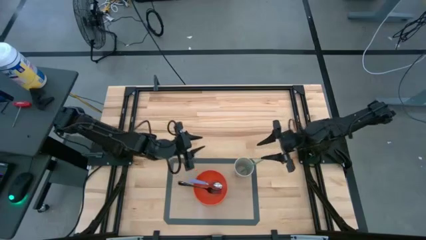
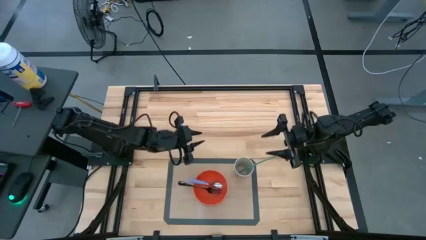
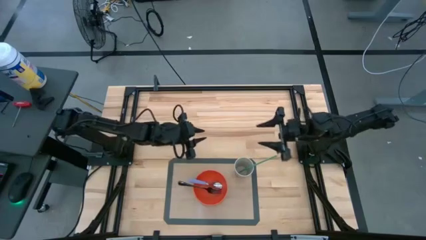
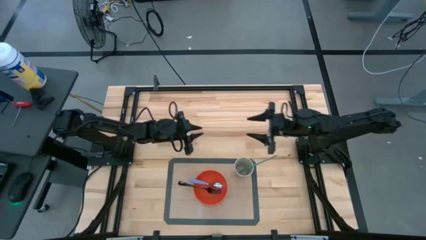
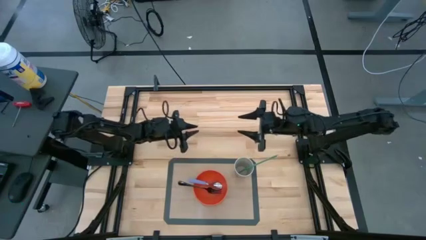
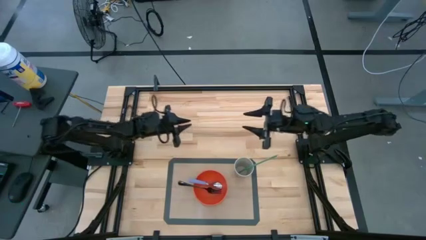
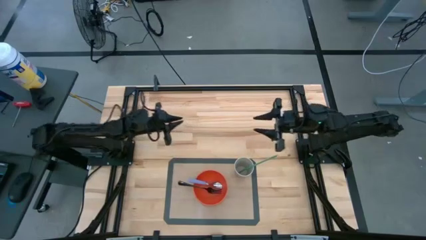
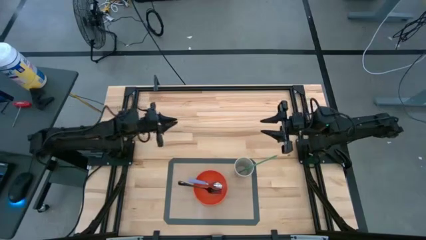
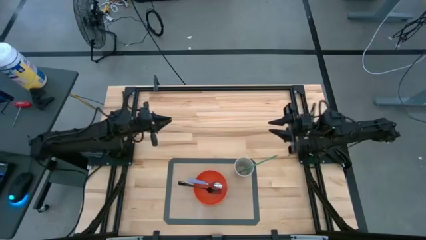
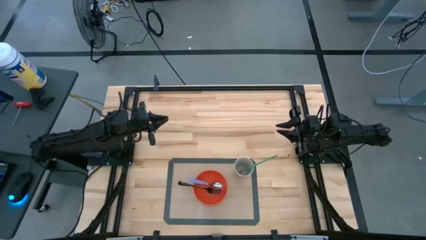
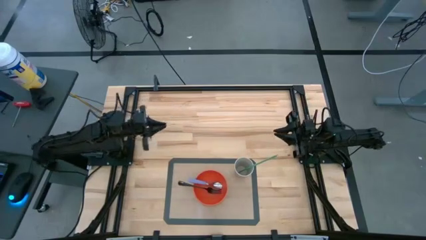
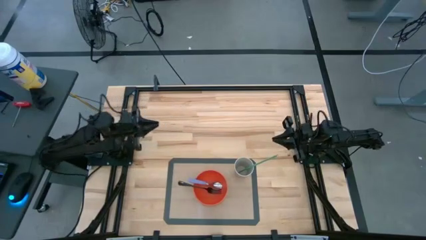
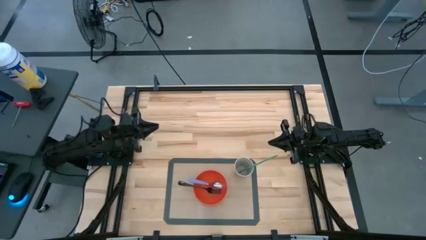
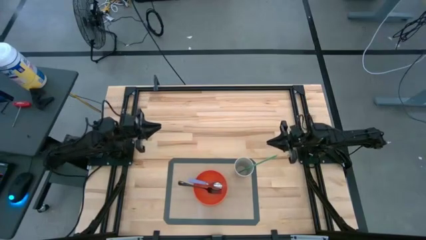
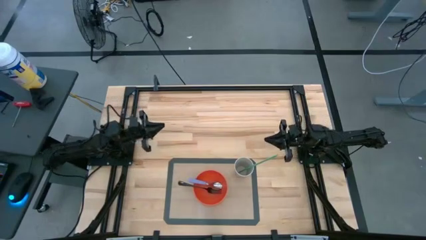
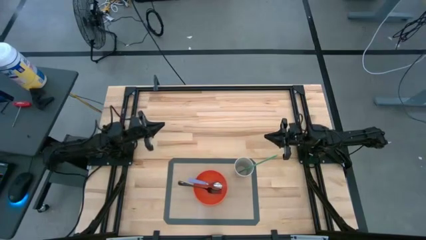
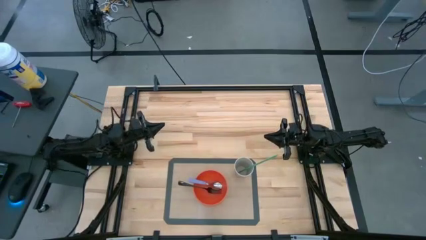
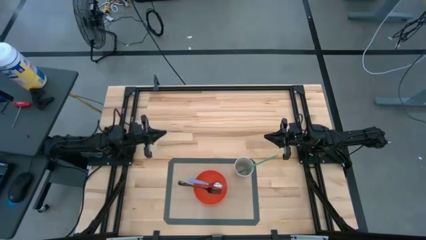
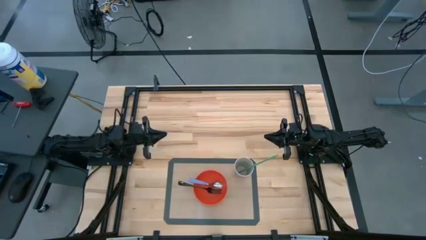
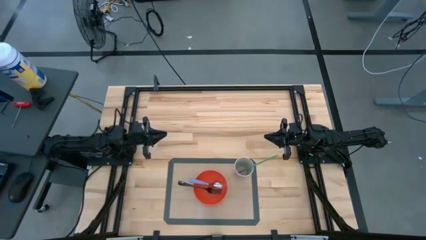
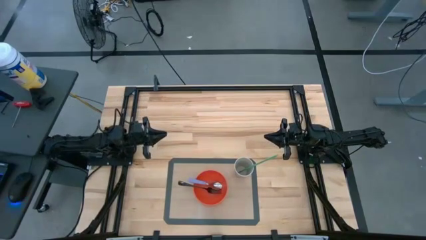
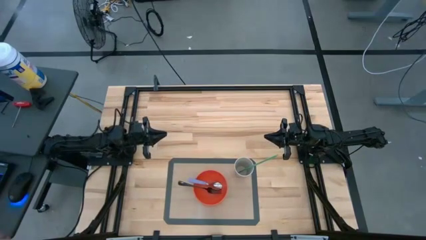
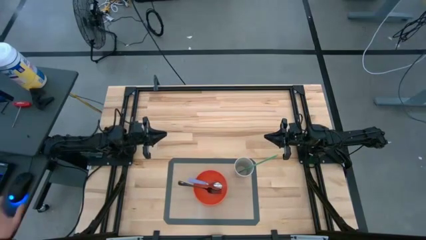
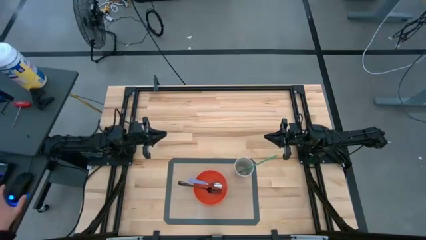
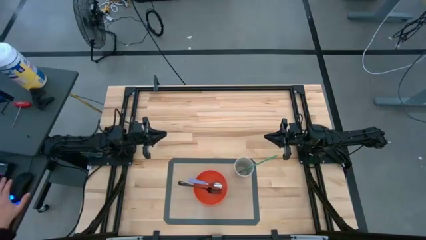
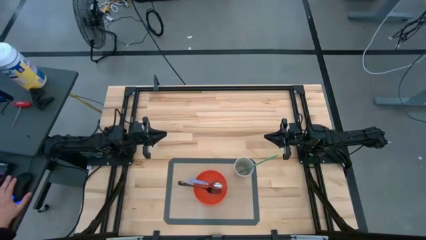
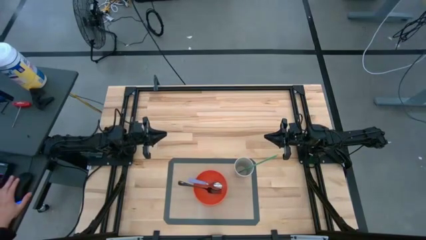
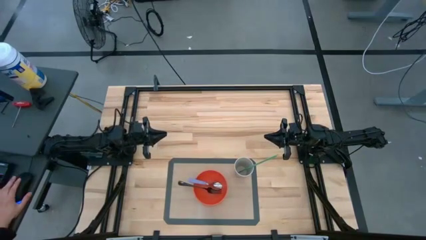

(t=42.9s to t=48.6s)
Task: Pick & Place Utensil
Return to Home Position

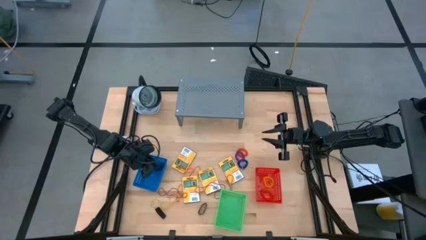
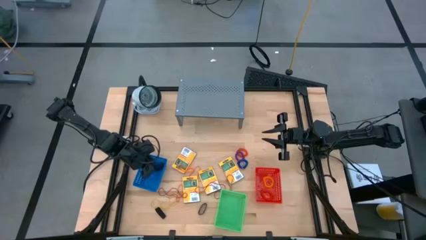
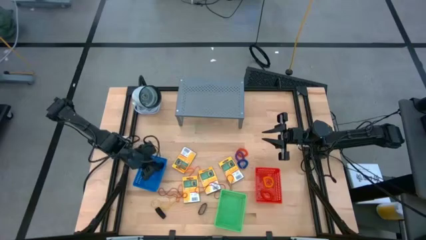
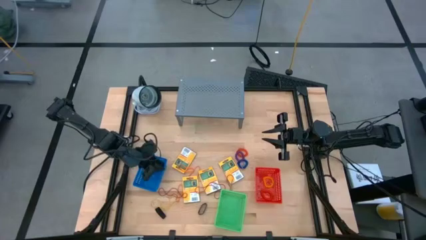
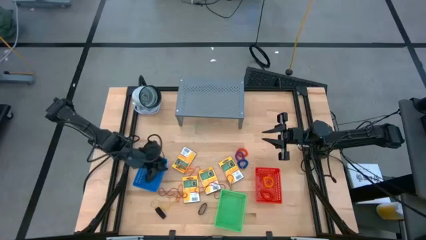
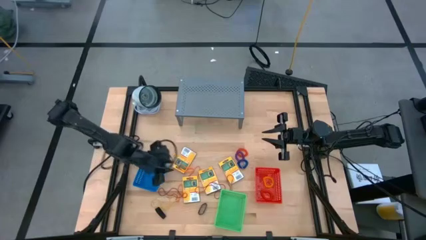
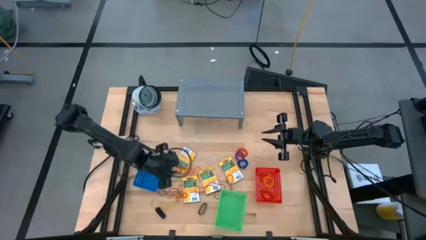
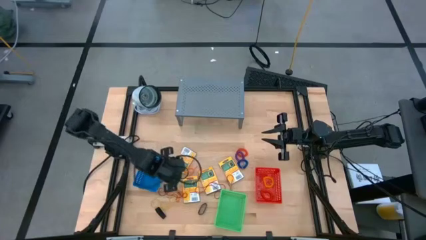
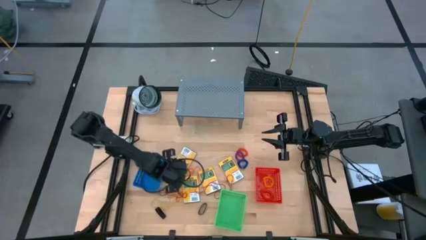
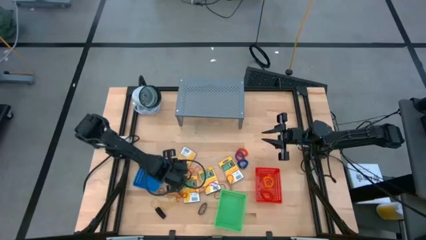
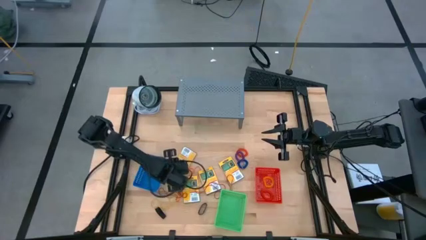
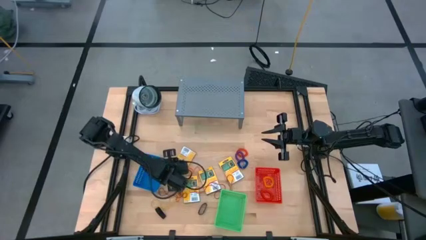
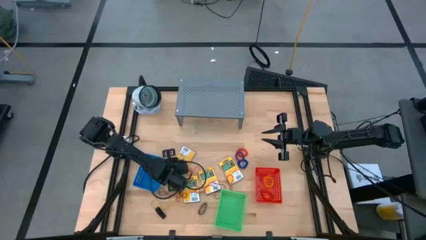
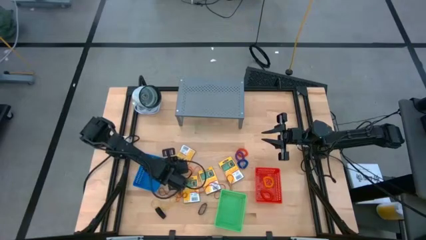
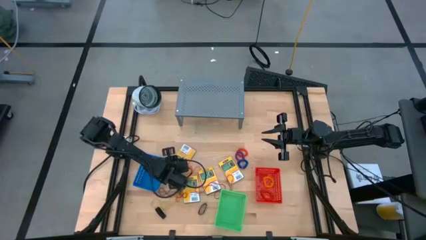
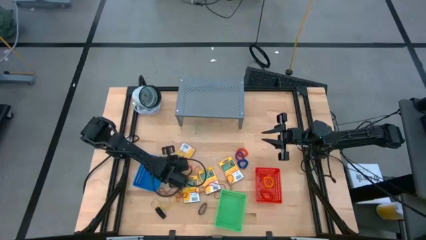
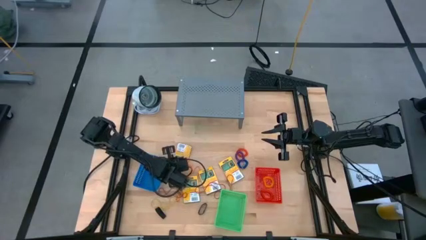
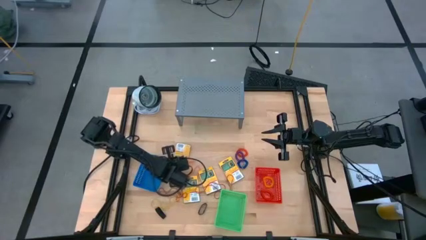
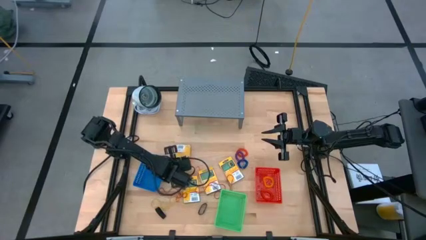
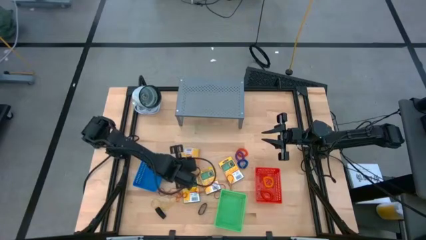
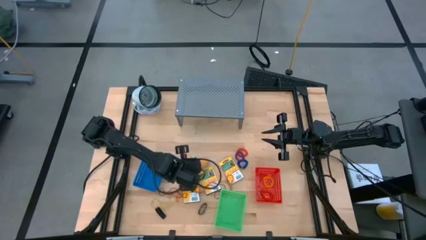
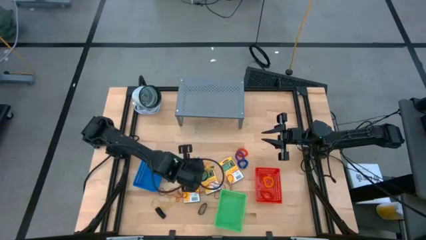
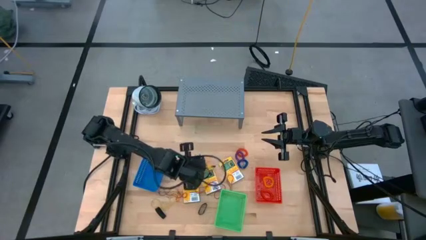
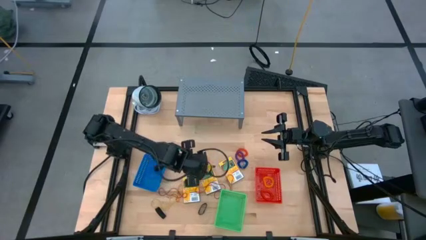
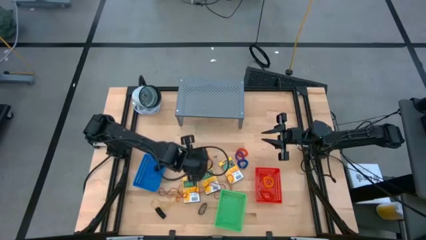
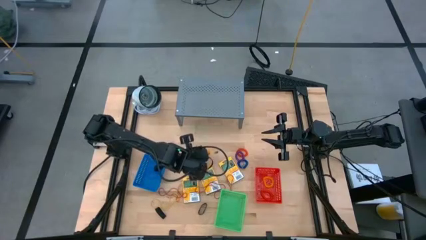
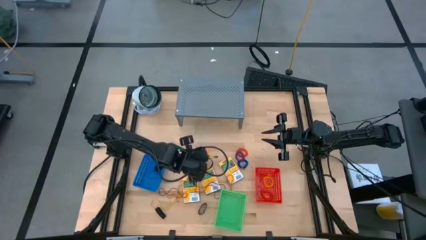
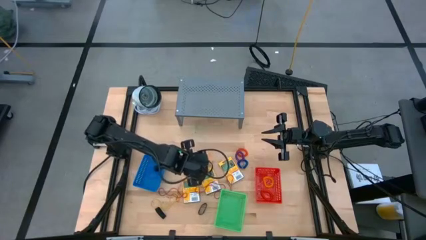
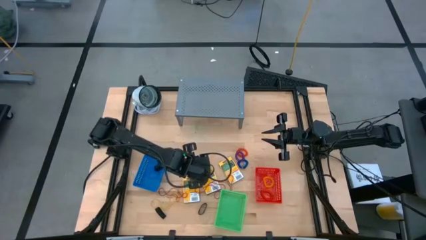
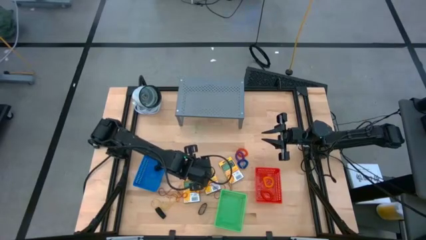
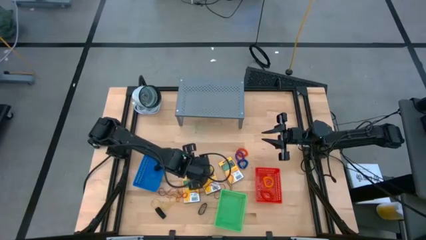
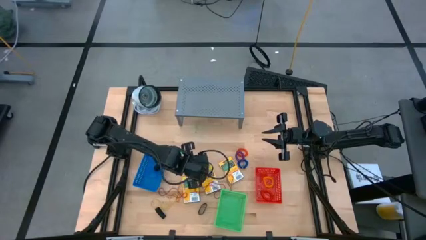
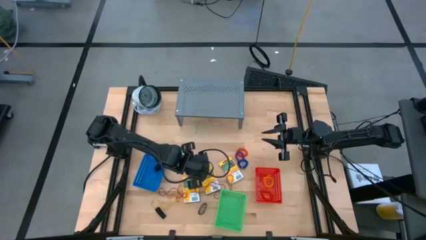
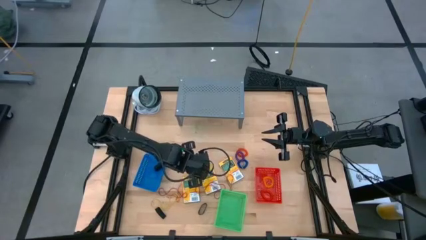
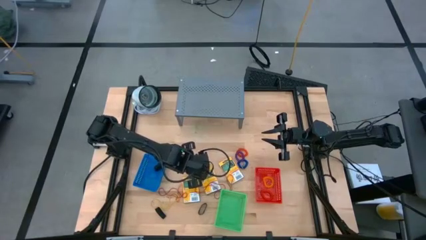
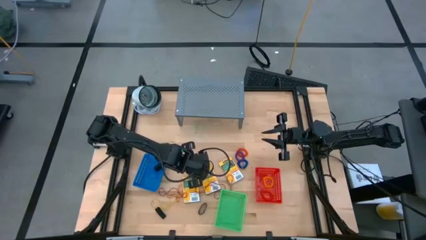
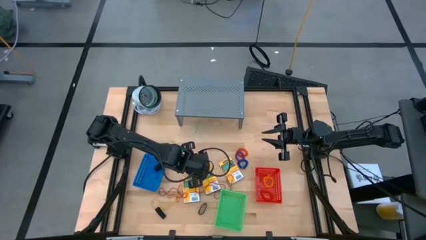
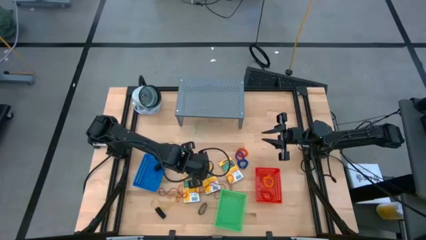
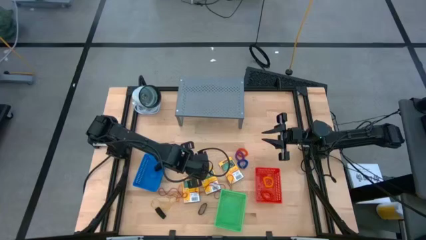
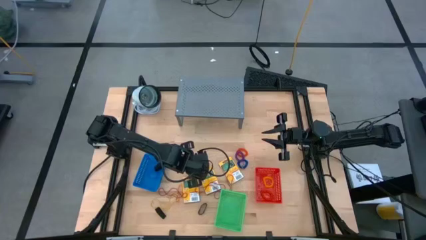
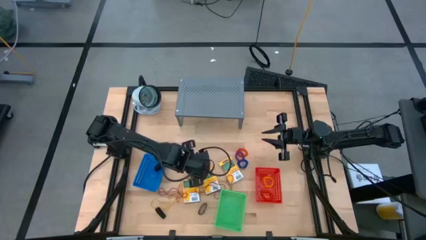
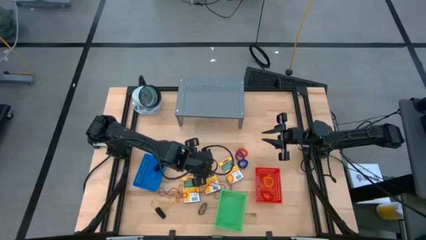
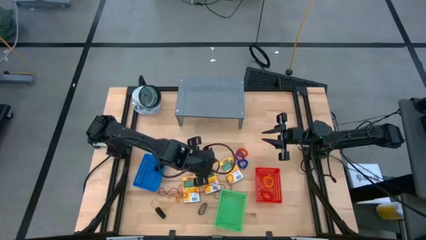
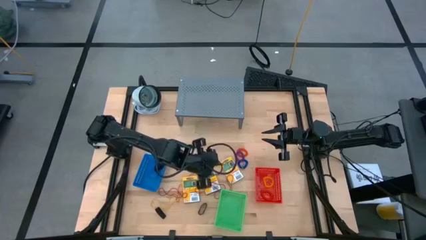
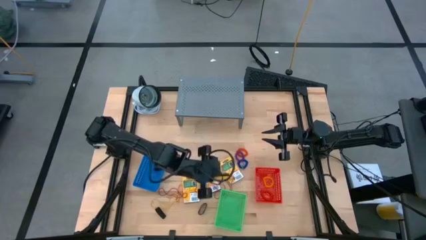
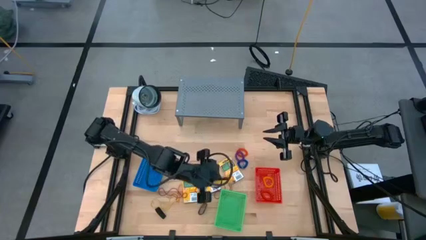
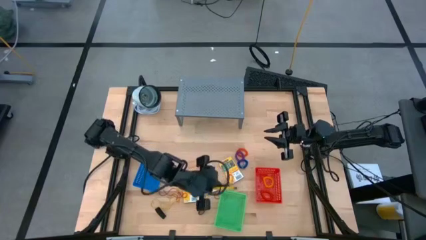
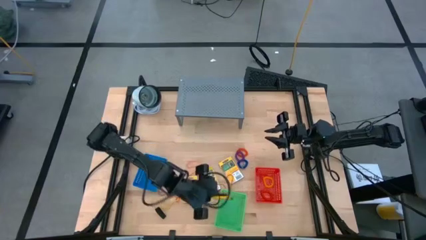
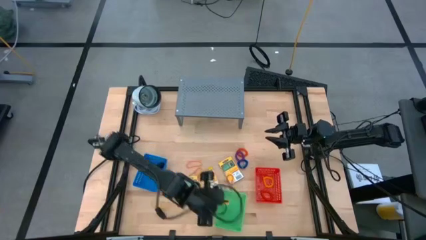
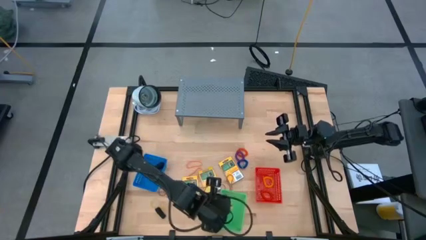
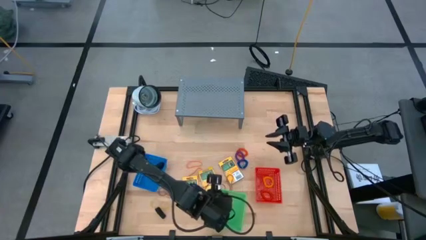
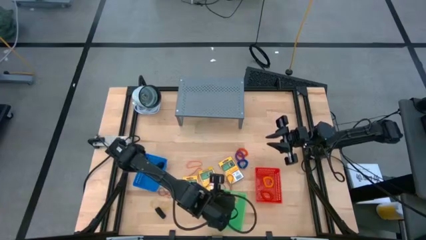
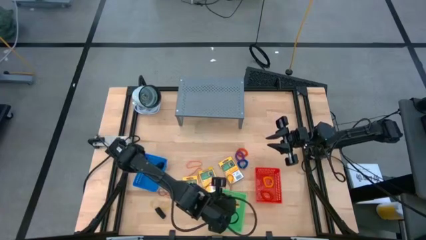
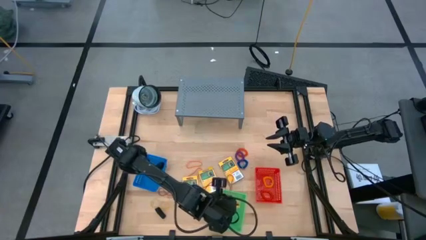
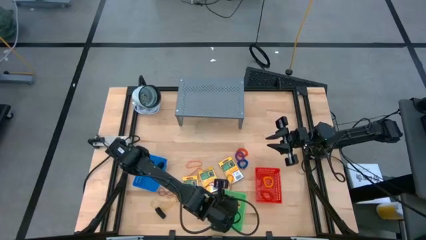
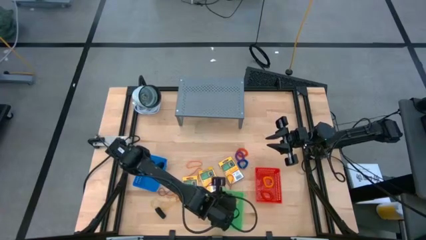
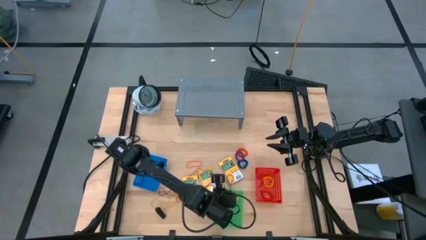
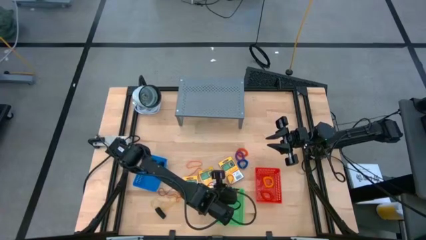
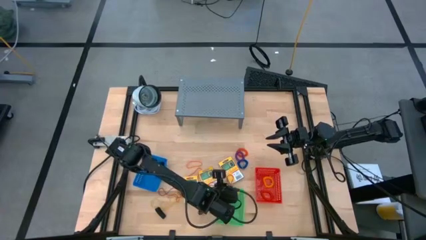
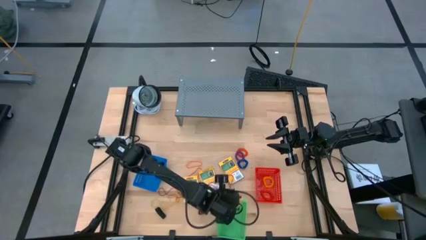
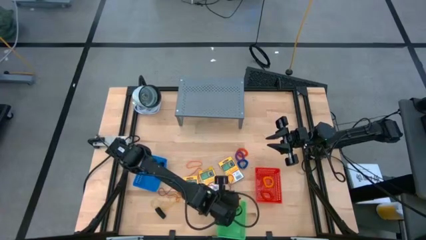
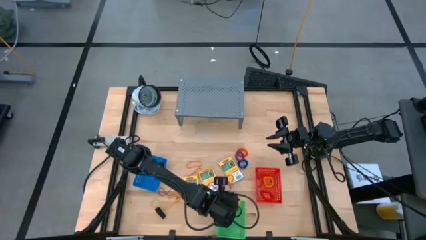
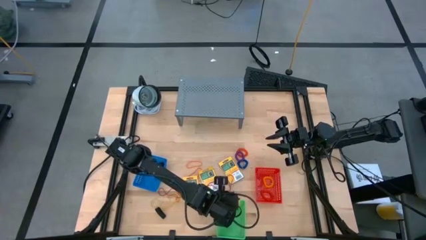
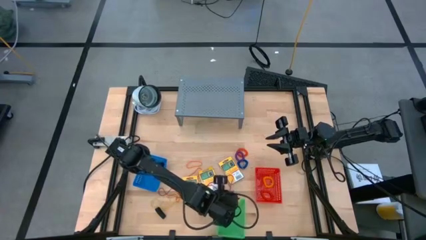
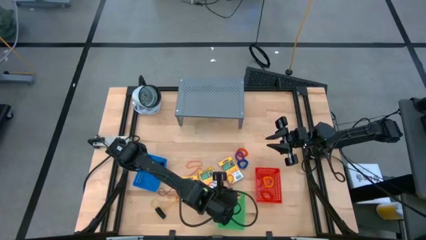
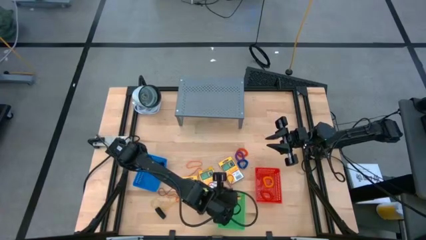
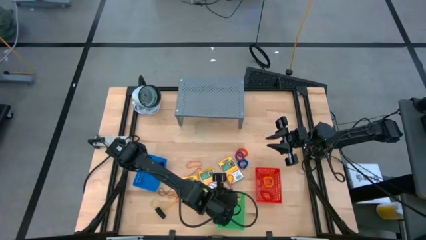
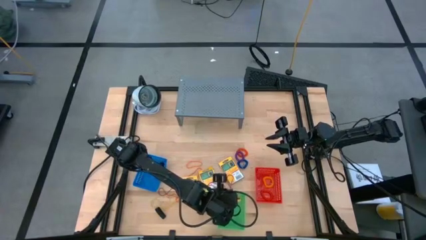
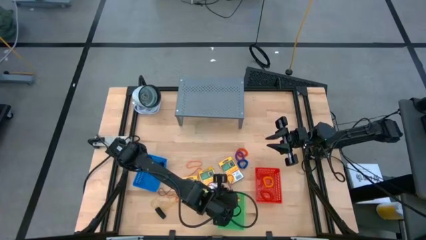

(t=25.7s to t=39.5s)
Task: Pick & Place Office Desk Supplies
Put the yellow crayon box into the green bin
